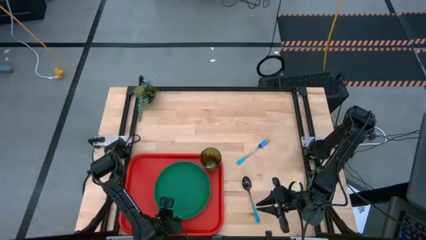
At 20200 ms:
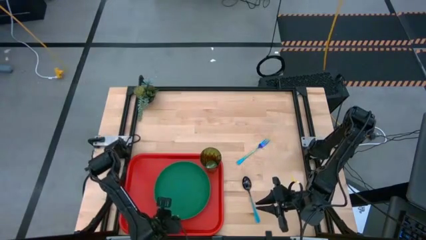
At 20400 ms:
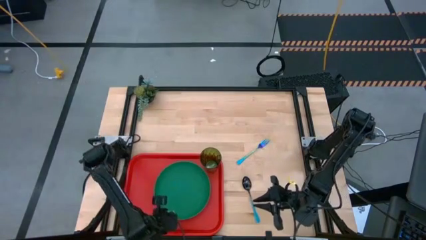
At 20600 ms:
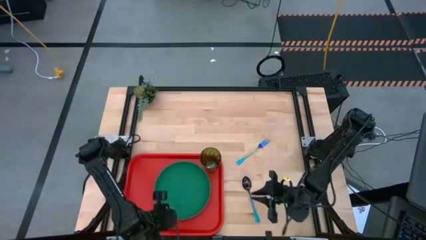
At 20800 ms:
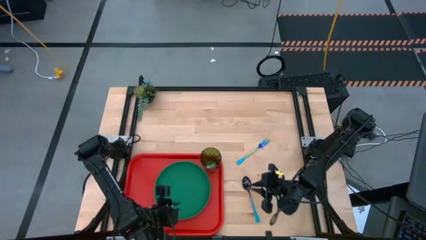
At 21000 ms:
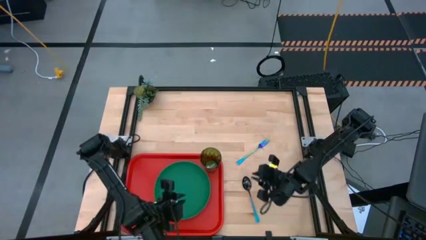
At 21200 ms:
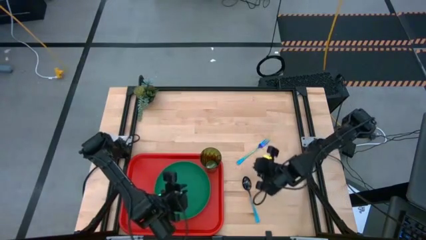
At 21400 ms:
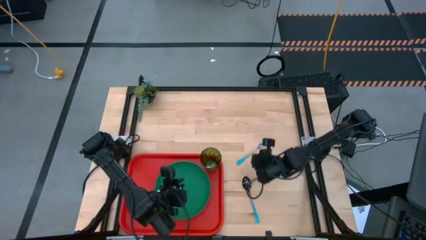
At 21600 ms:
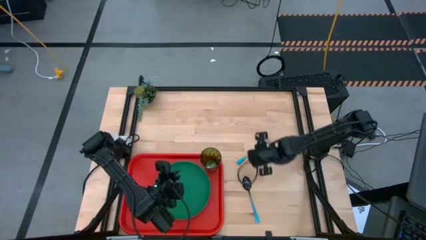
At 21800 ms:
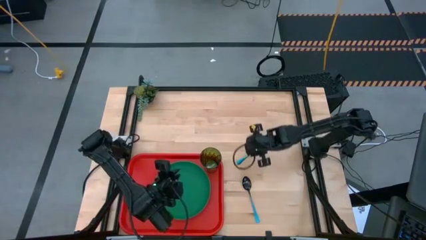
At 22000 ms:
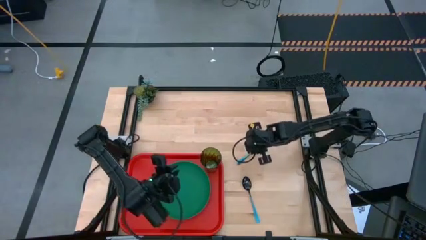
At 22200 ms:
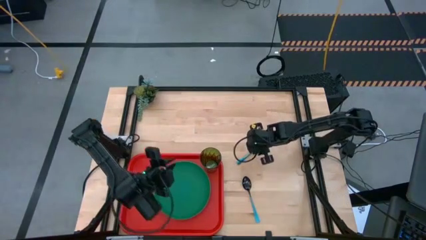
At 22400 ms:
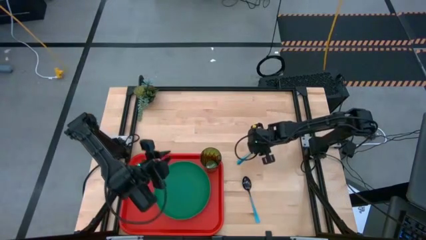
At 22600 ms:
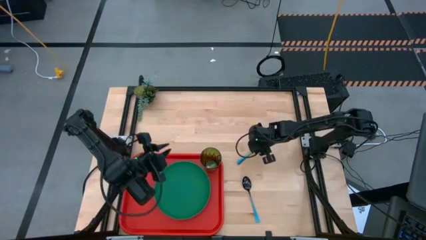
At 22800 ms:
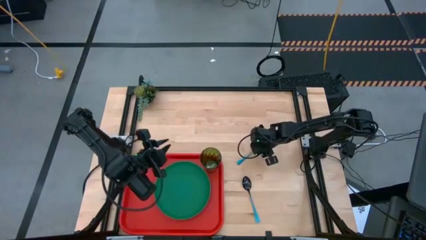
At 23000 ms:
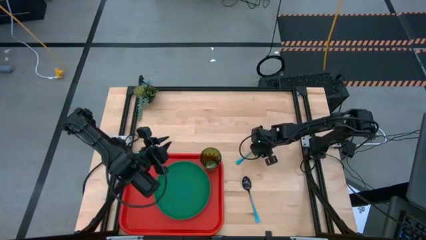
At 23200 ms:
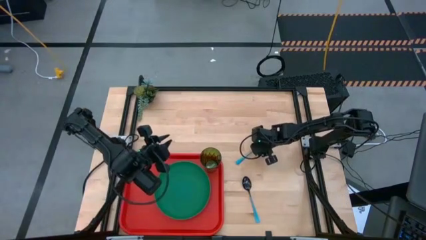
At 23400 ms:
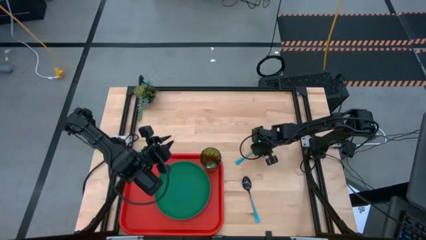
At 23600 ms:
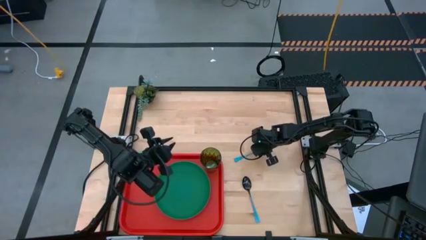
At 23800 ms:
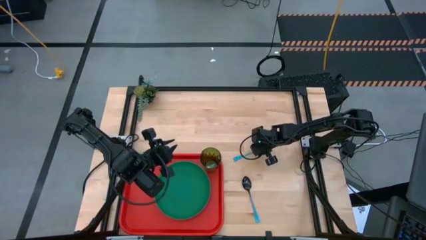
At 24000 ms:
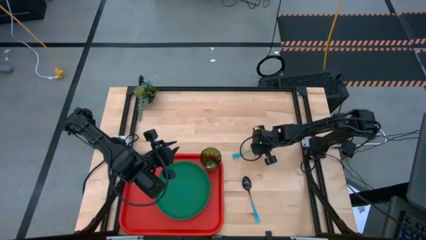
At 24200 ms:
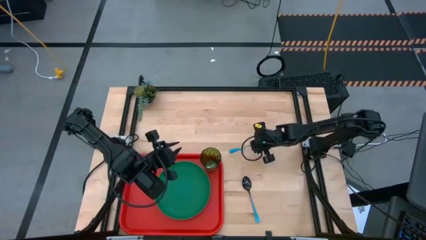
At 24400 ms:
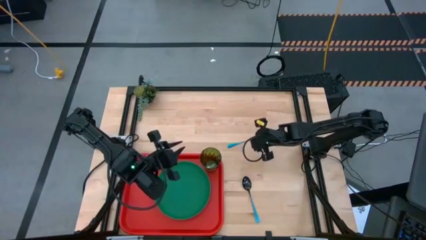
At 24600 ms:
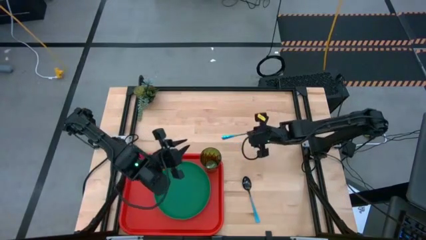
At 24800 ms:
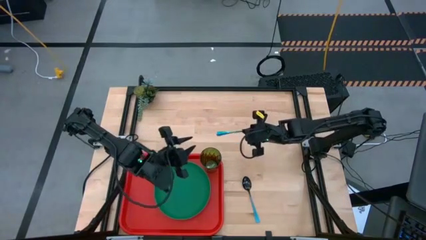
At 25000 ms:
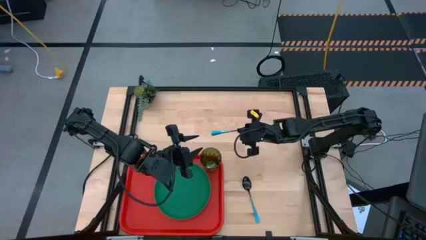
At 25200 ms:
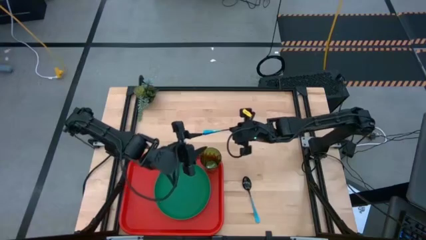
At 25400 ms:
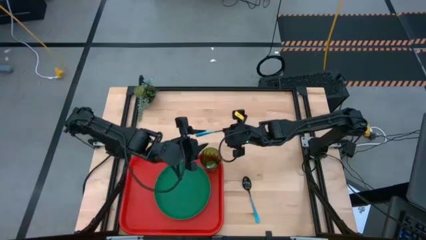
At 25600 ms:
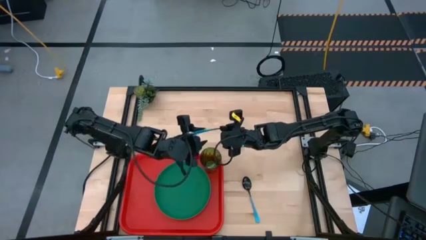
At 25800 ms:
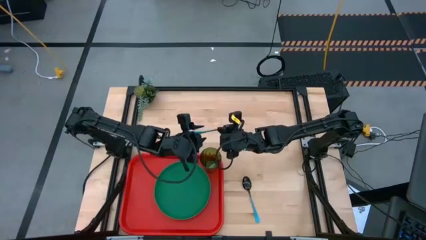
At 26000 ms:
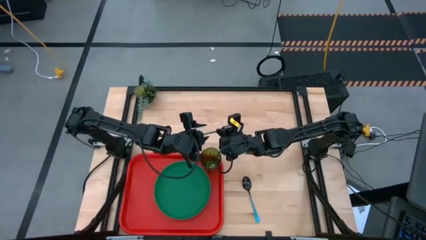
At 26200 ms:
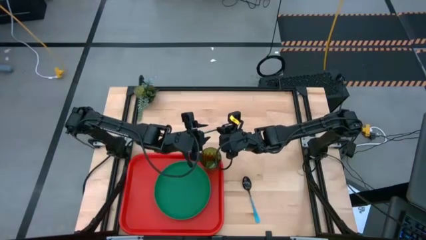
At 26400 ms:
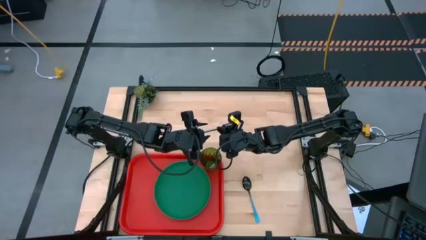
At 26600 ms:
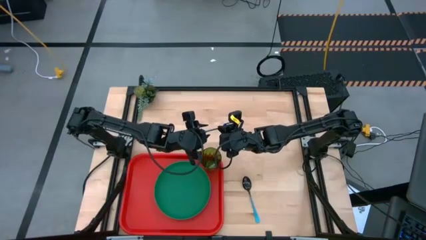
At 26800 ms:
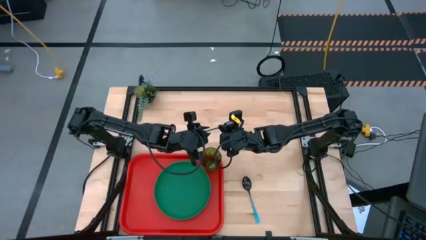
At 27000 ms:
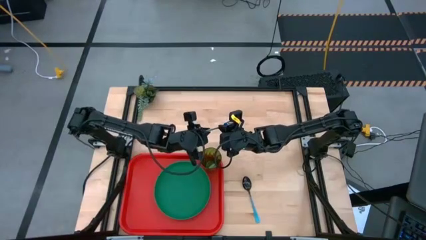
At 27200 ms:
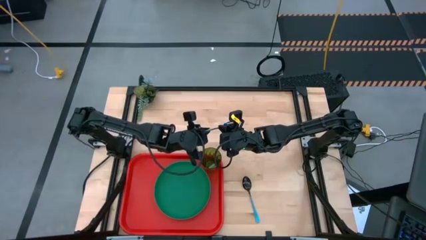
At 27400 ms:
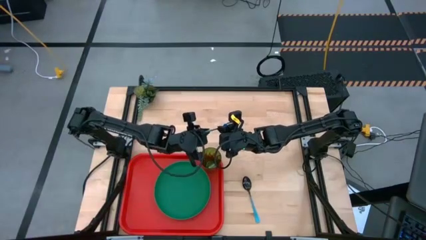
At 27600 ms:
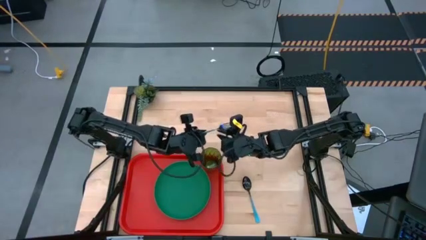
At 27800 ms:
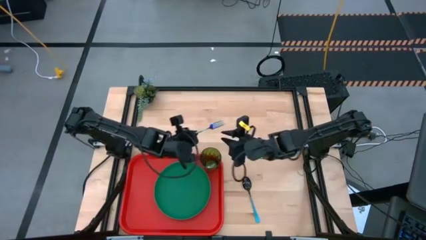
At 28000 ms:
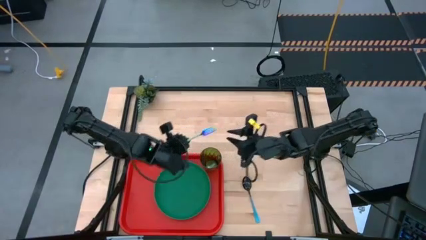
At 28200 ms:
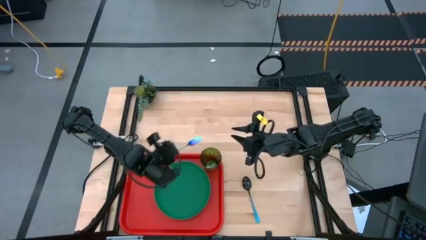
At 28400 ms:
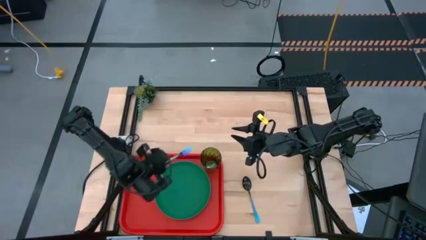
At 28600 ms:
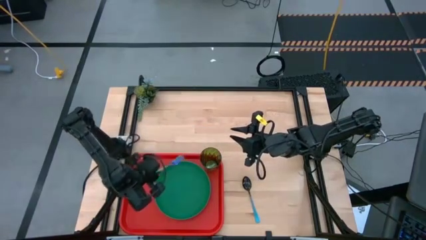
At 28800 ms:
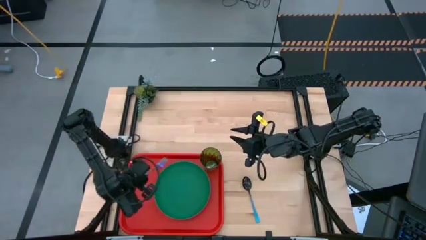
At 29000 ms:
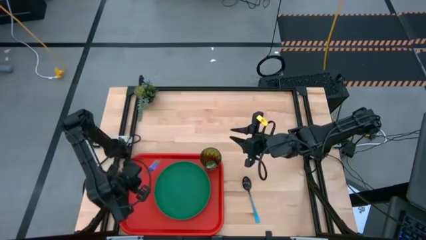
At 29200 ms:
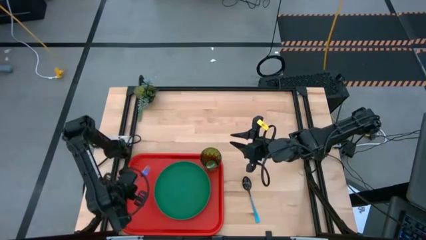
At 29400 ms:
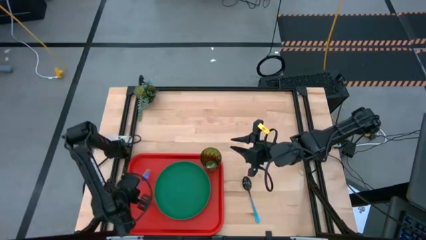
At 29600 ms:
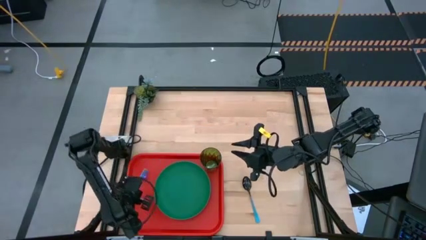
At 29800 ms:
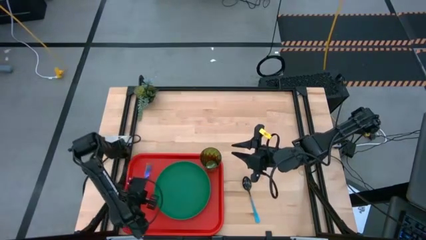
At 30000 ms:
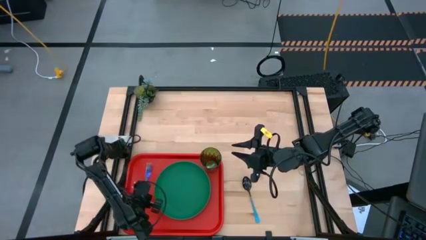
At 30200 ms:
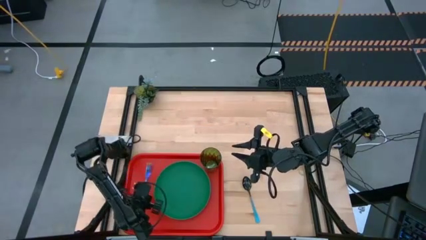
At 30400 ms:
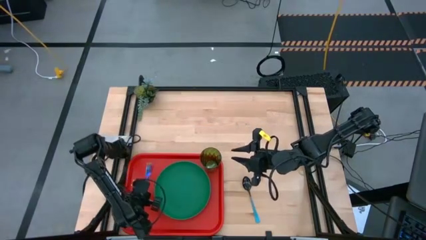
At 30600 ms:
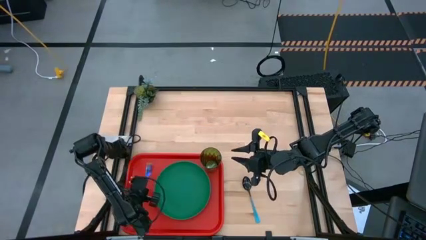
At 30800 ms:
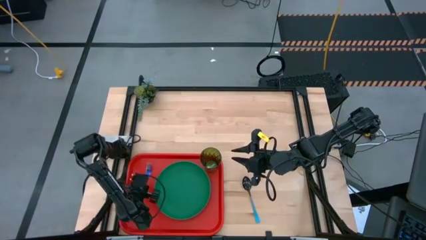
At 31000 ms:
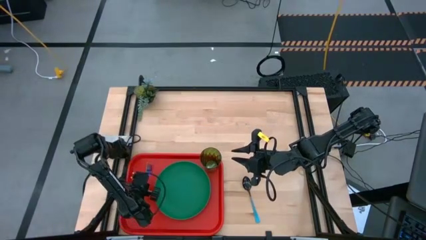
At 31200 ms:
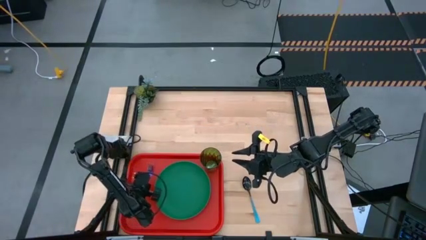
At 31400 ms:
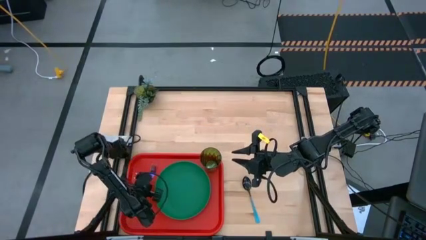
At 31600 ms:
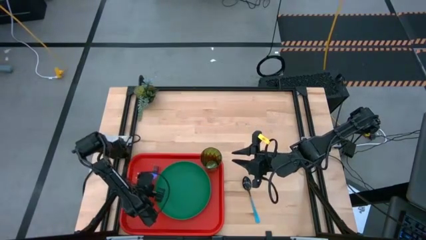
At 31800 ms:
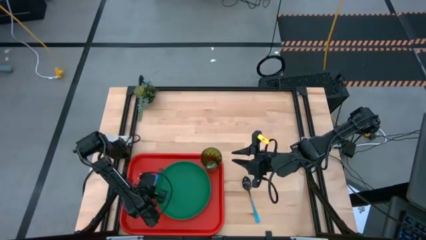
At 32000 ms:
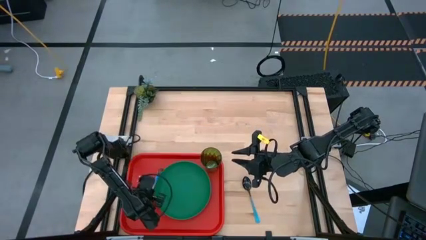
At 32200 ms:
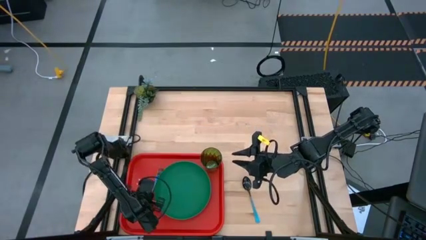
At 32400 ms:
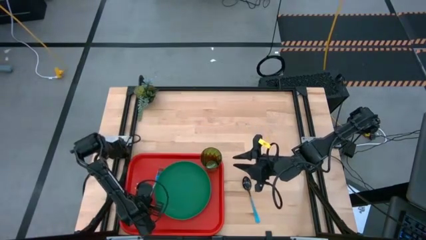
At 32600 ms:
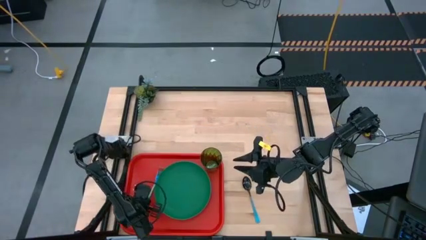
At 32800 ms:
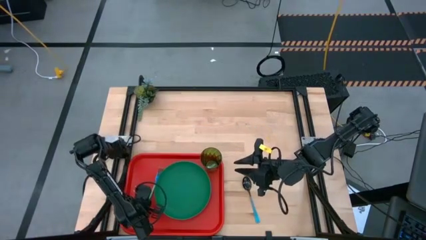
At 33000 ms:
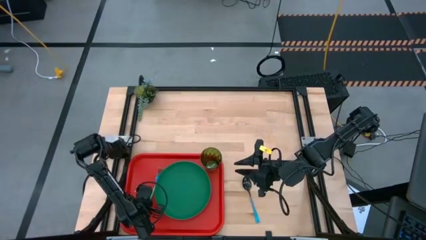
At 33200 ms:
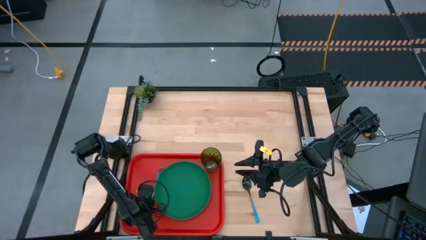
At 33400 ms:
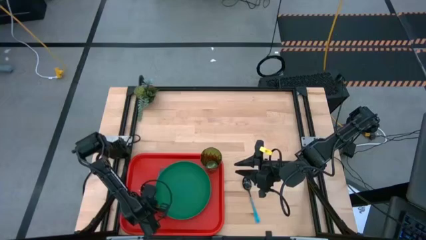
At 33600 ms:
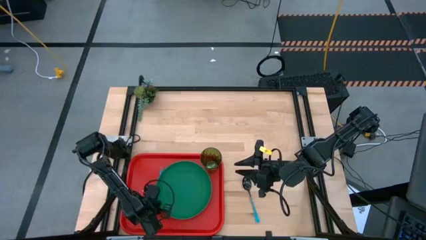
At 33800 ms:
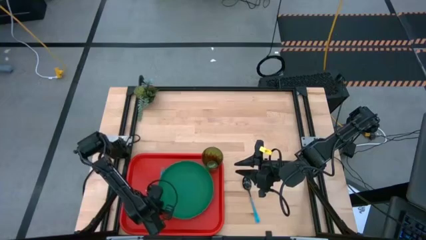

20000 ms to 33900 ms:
Task: Pick and place plate/cup/fork/spoon on tray
Put the purple fork on the red tray to the left of the green plate
